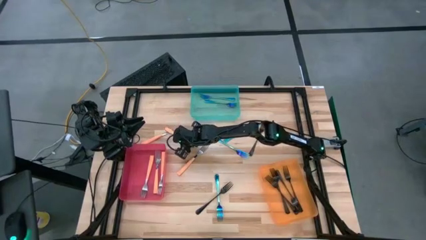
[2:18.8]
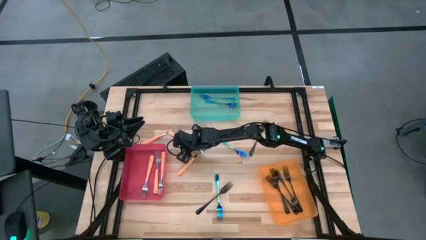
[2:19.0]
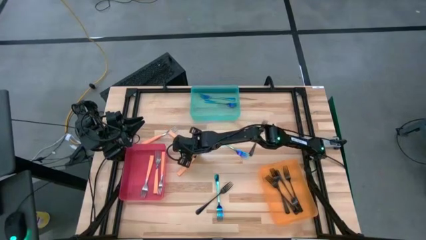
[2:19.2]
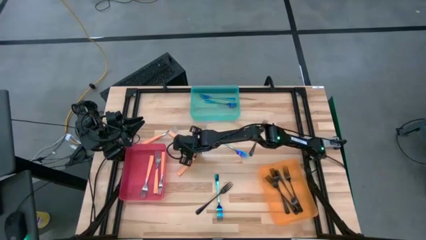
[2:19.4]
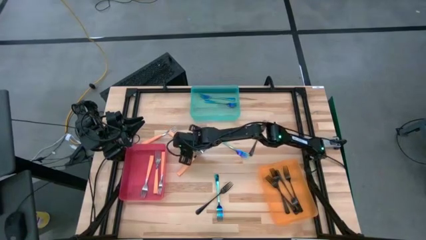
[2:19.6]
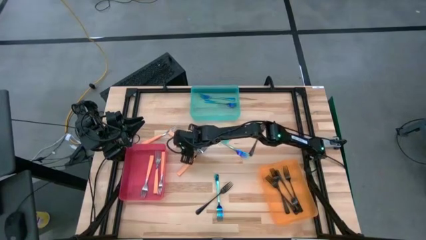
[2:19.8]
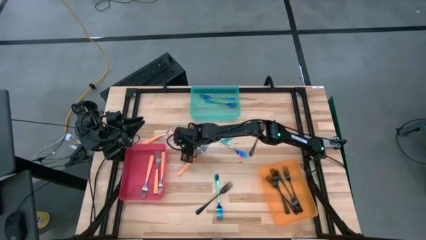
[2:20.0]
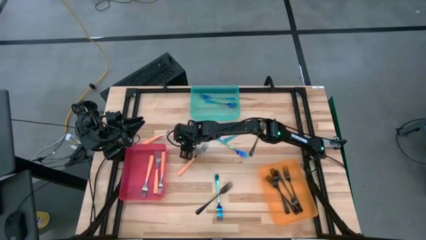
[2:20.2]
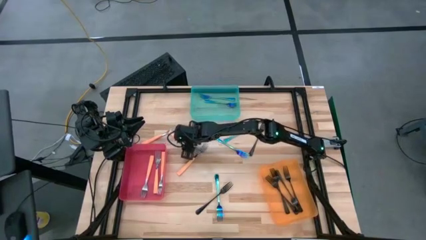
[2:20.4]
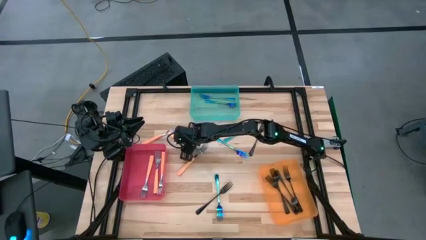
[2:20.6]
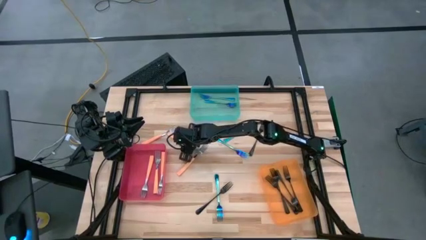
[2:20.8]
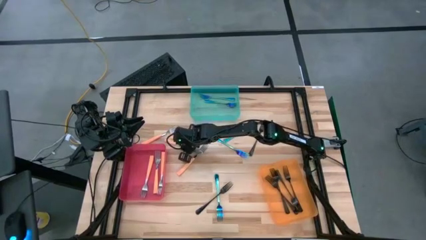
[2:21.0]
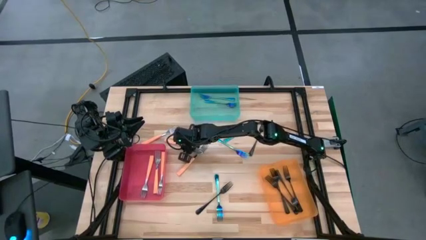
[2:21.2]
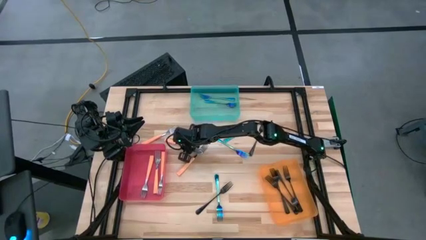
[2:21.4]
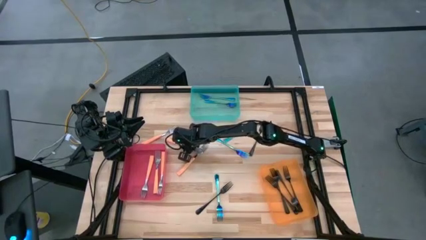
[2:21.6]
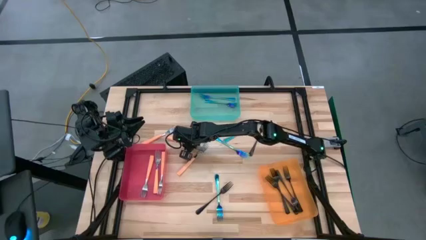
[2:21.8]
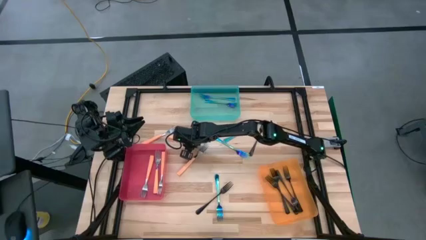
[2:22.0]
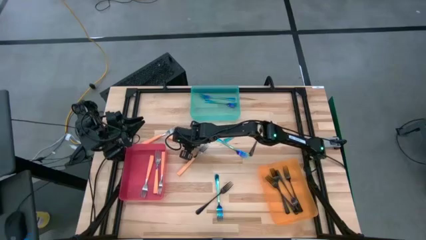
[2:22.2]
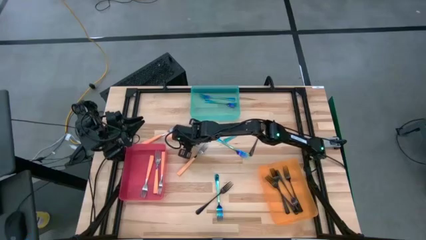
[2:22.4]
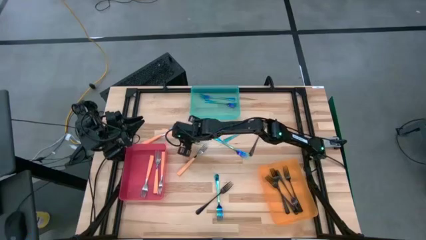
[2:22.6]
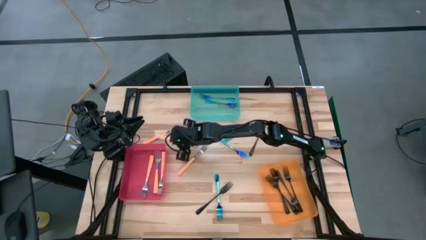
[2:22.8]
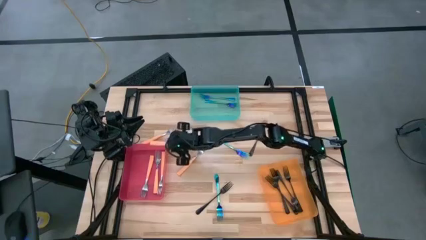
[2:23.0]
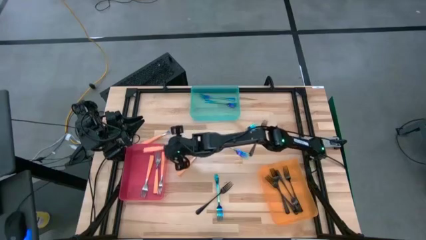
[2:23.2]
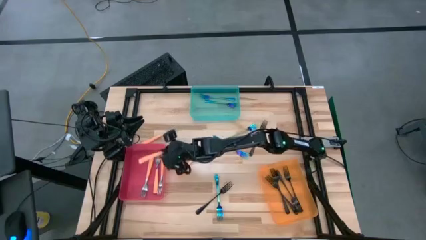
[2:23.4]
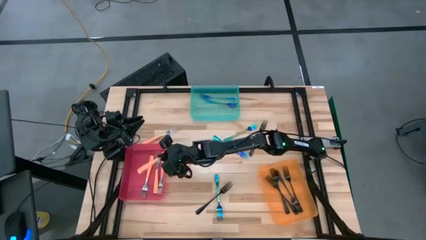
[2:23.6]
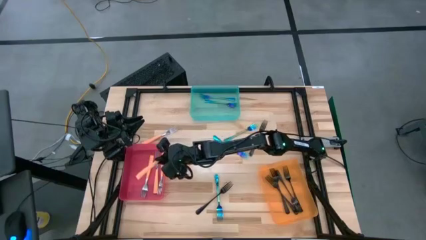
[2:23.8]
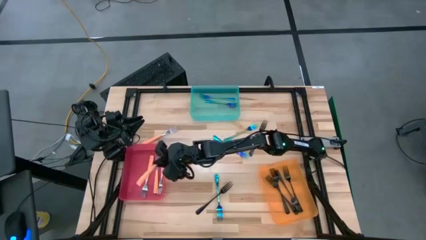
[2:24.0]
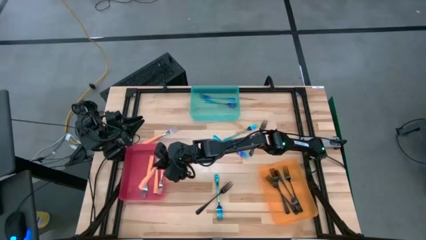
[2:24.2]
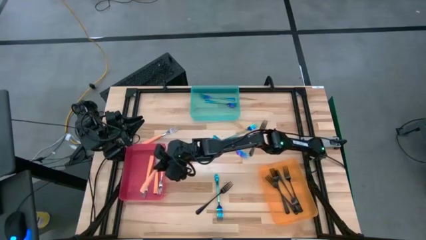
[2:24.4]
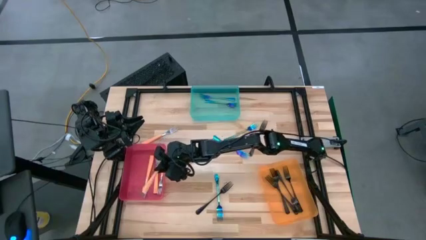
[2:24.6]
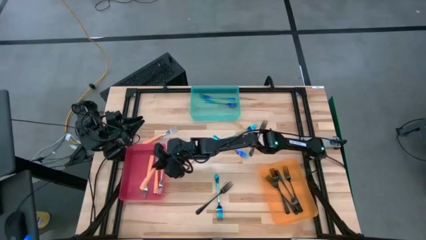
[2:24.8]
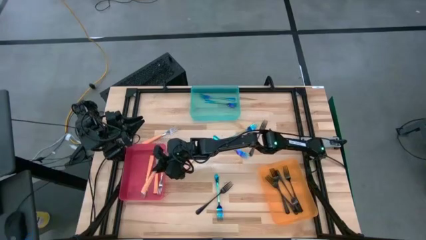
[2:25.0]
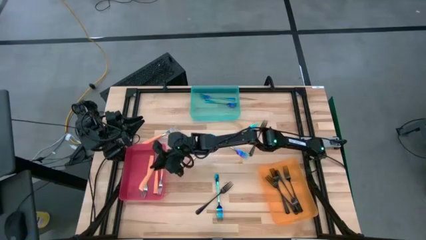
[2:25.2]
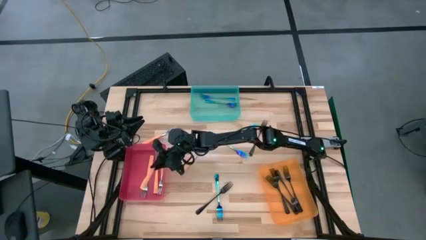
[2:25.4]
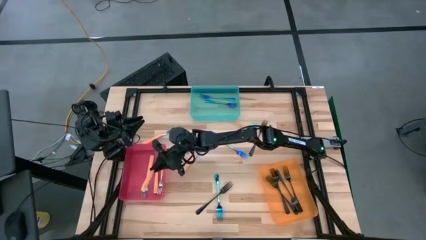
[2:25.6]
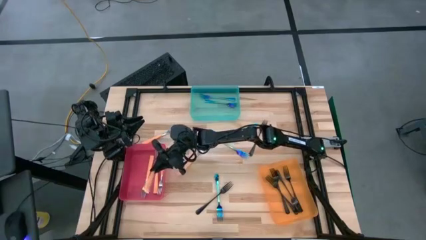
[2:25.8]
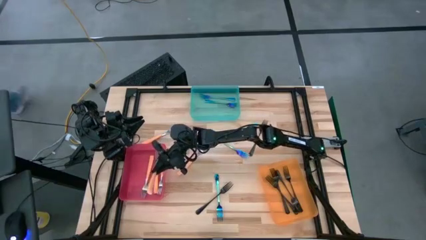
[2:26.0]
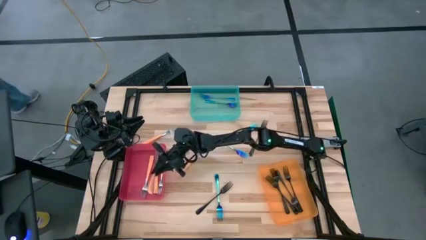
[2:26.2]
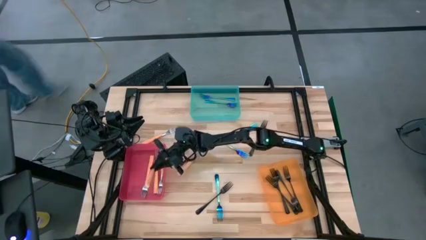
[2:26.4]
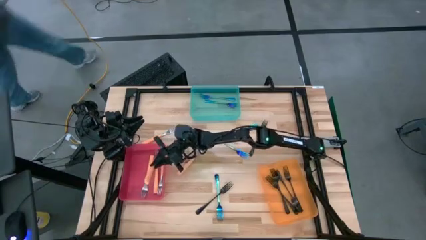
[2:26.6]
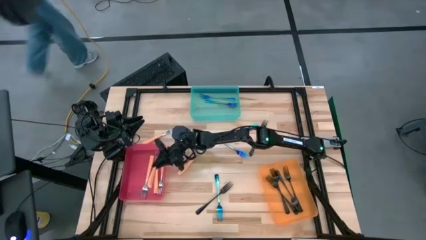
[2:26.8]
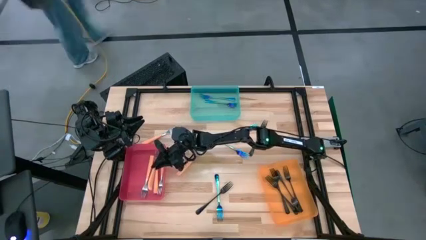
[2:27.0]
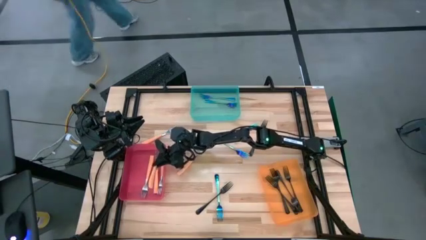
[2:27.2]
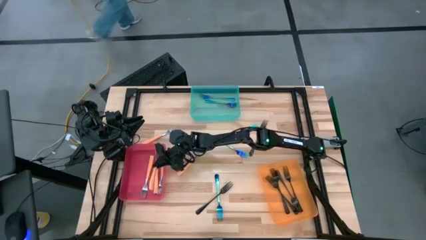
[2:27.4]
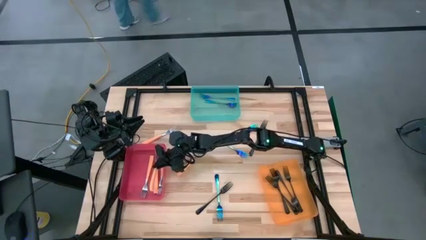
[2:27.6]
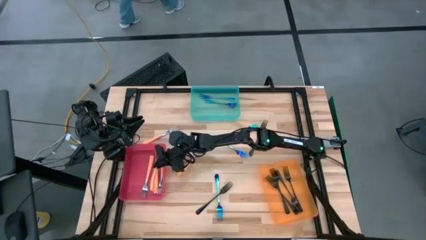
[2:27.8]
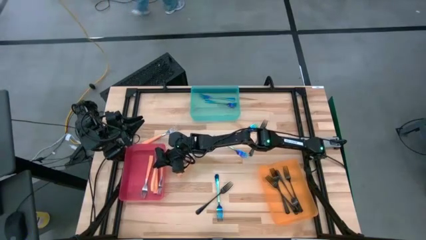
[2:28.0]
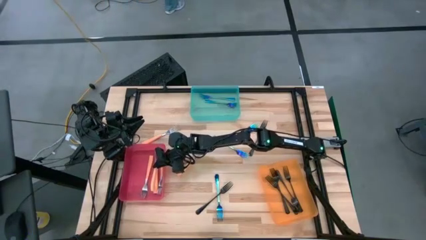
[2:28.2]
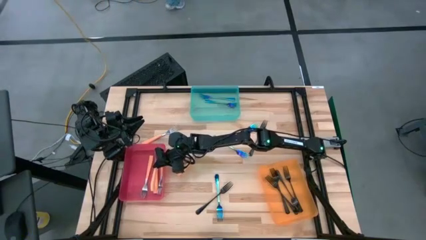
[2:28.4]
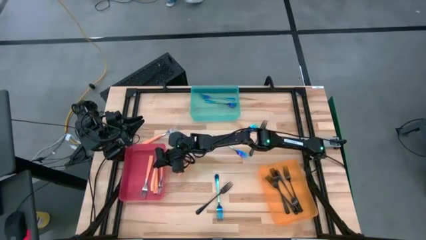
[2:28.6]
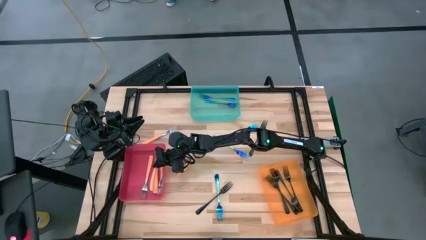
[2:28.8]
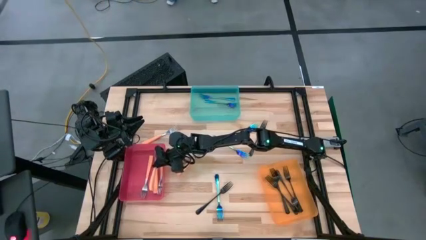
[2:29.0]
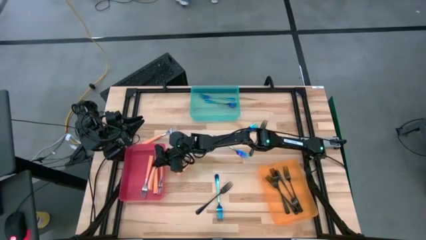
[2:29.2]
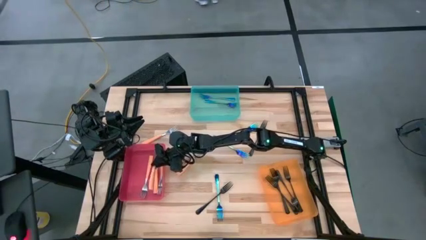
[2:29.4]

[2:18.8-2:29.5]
Task: Sort silverware by color (type)
Put the orange fork into the red bin

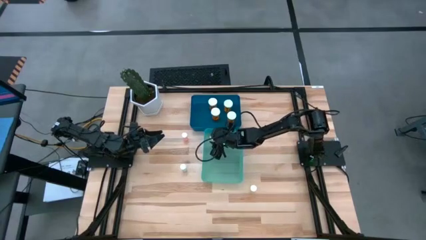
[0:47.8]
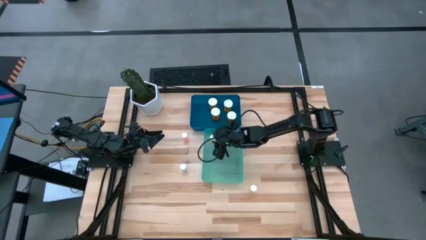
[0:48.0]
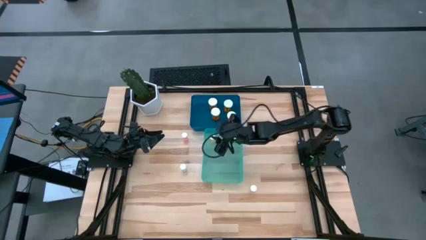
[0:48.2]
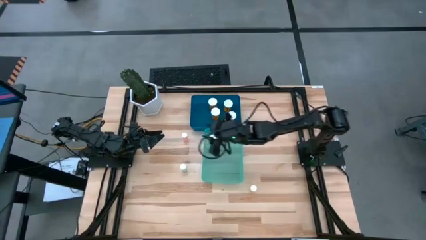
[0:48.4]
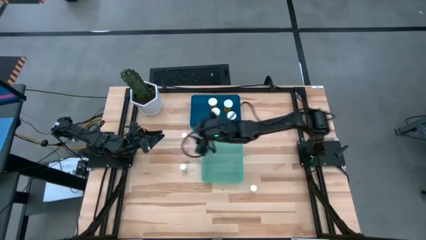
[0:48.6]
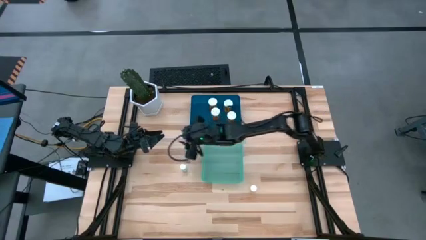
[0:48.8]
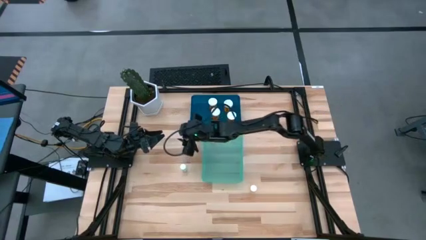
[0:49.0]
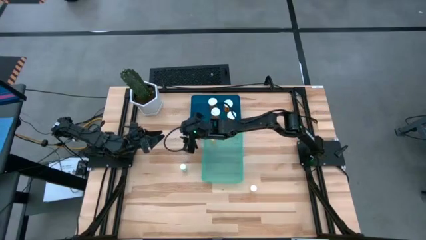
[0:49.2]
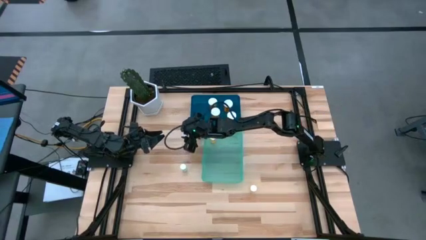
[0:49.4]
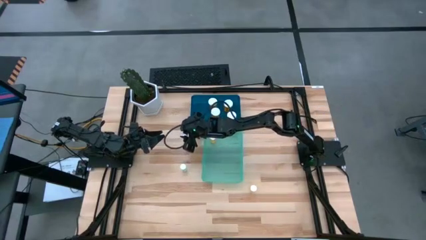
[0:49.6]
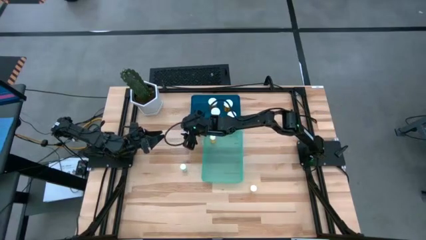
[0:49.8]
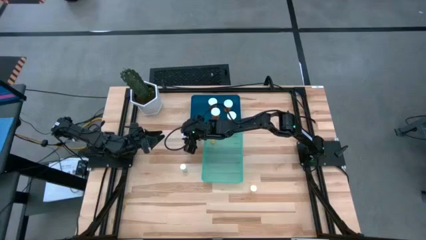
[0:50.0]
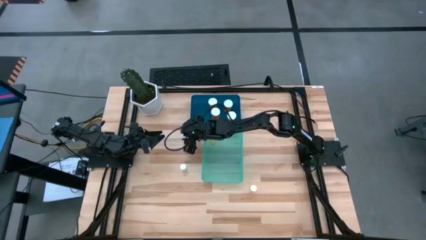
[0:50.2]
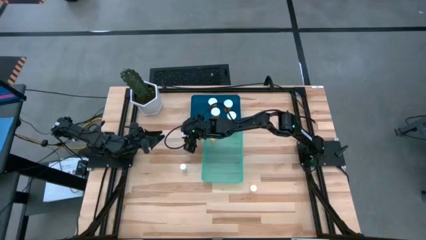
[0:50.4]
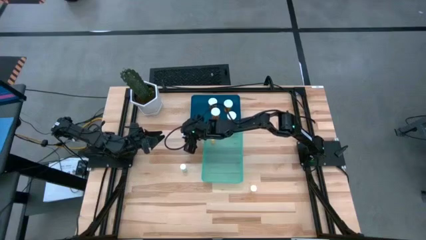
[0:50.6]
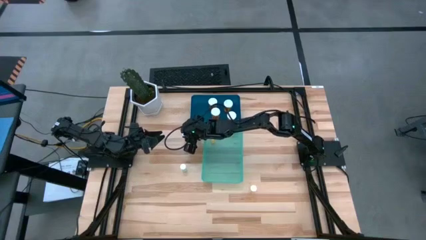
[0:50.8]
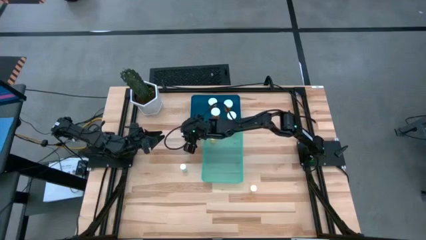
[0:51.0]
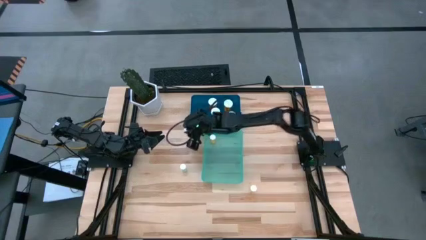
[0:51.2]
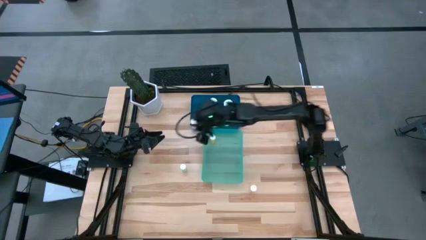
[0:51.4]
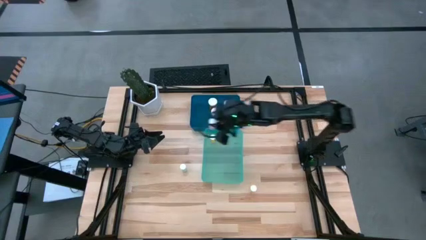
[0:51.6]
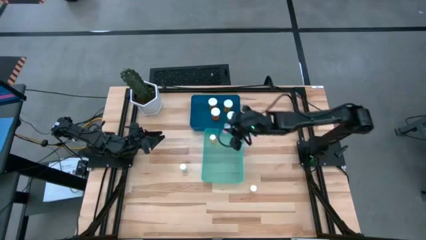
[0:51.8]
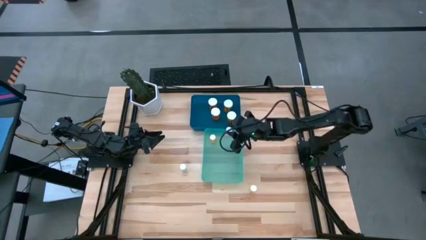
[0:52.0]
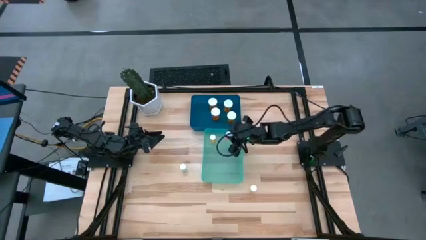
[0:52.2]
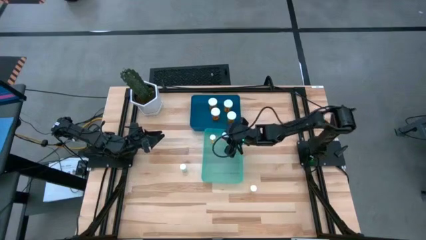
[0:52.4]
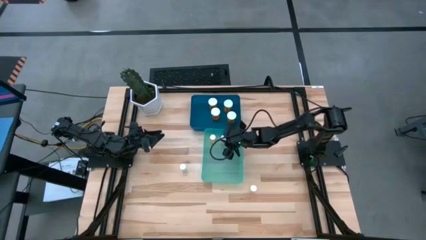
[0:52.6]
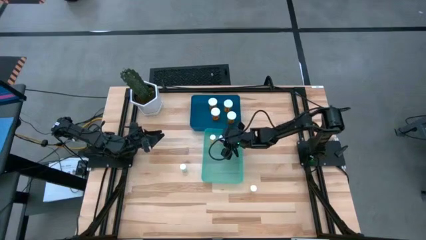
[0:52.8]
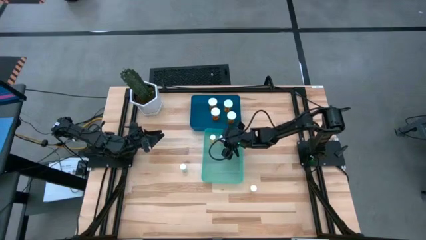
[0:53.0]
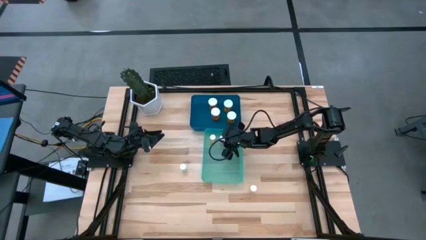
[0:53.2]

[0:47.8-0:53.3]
Task: Pick and place medicine bottles into bin by pill shape (circle, oval)
Put the small red pill bottle into the green bin
